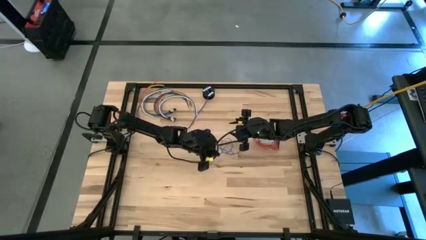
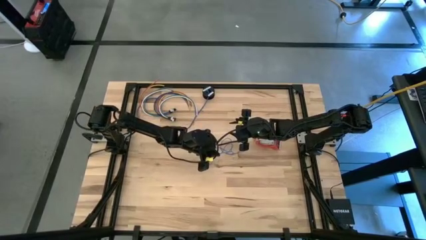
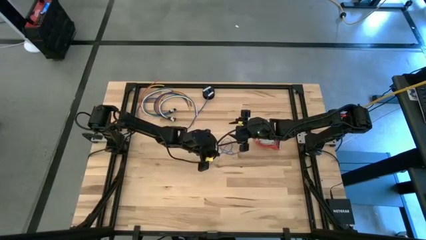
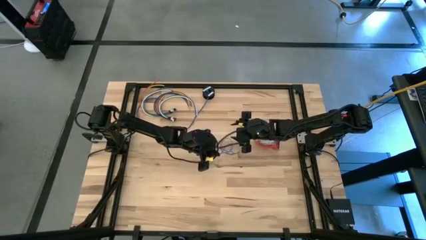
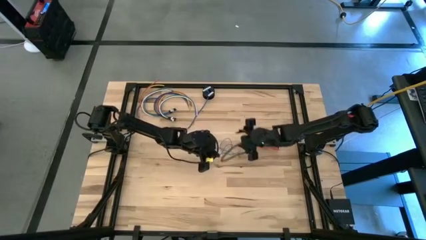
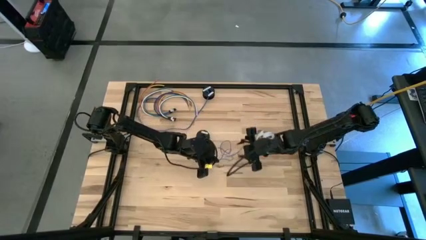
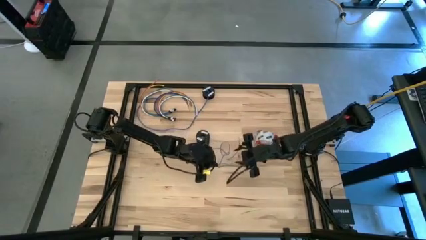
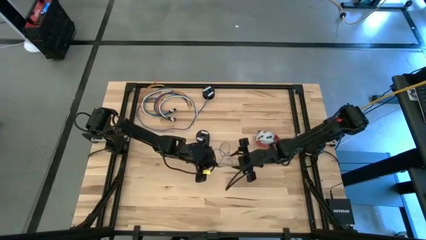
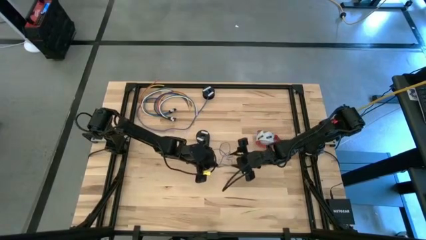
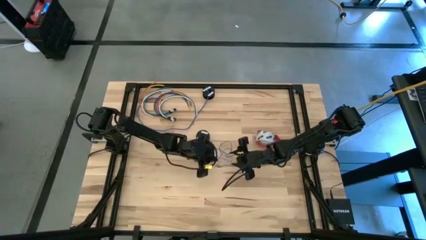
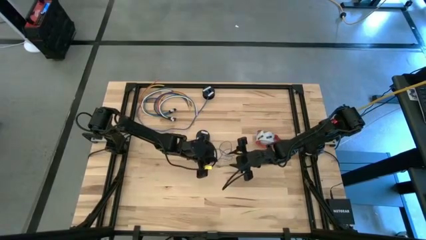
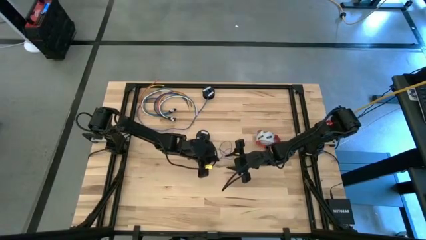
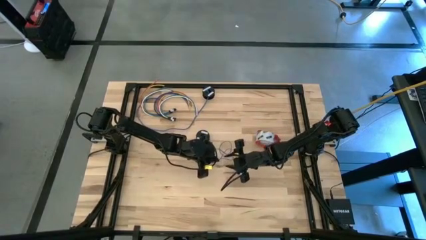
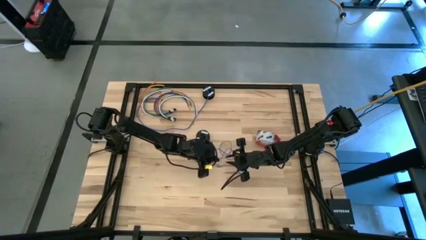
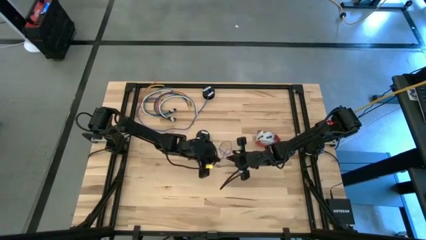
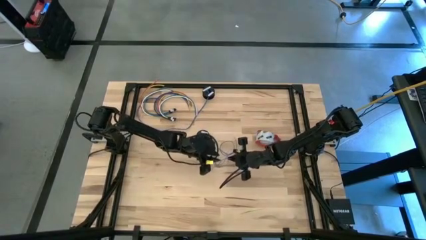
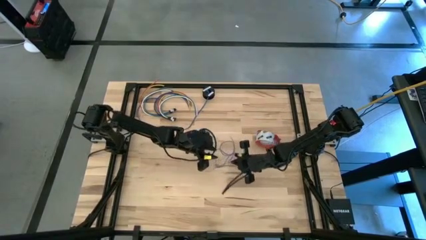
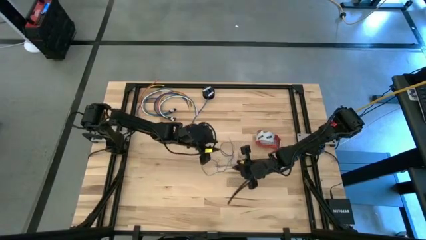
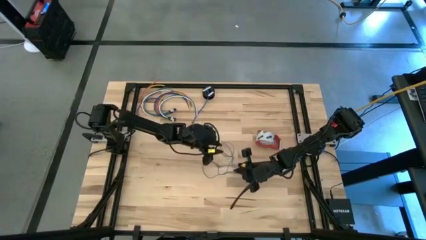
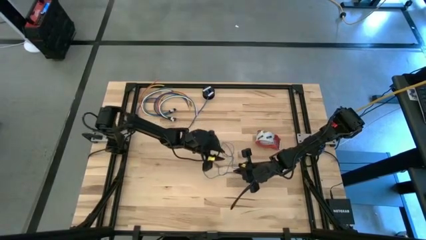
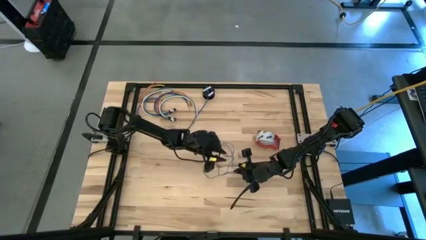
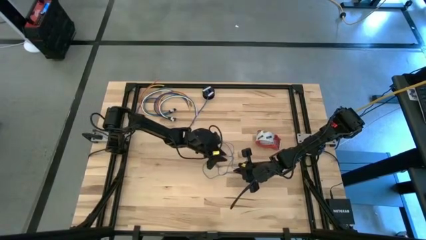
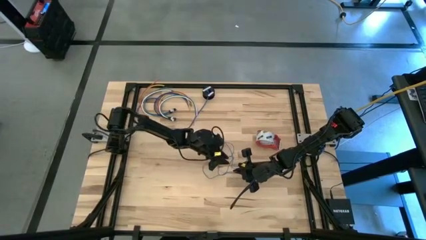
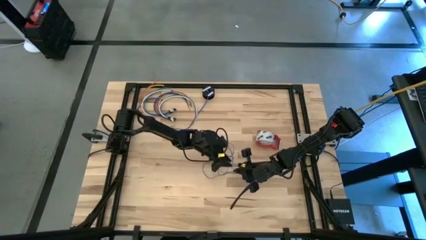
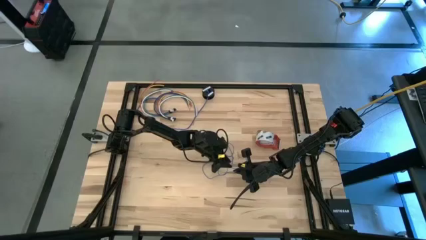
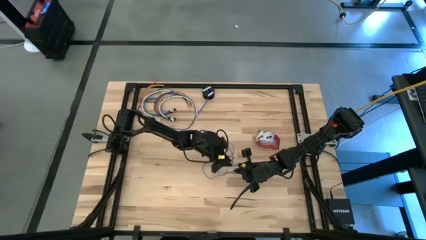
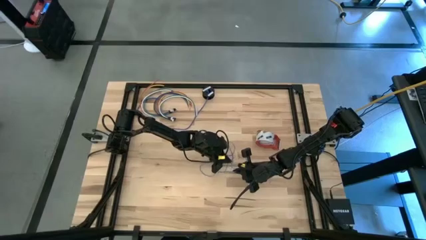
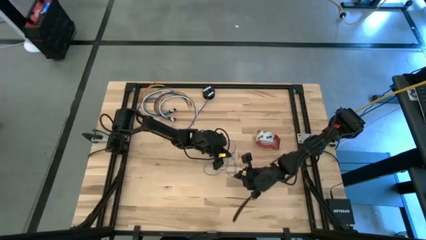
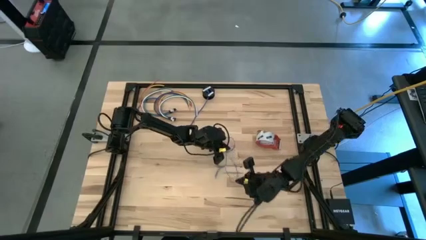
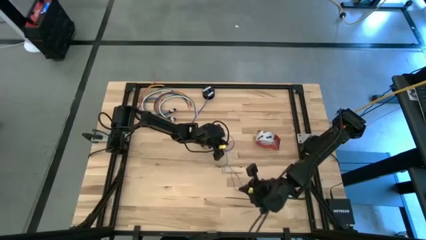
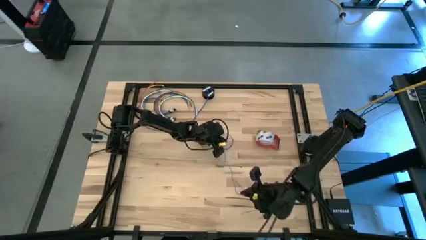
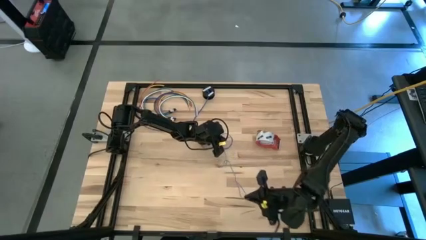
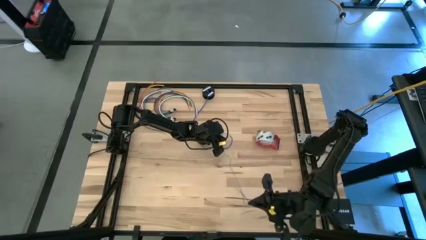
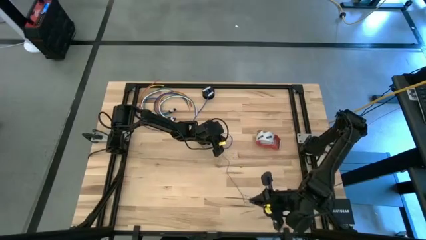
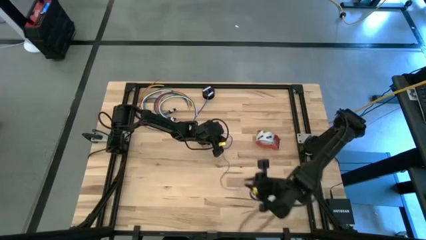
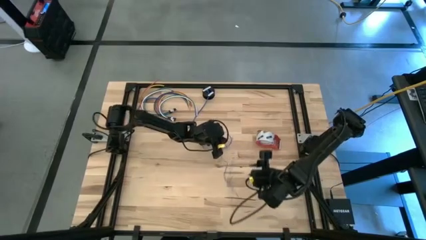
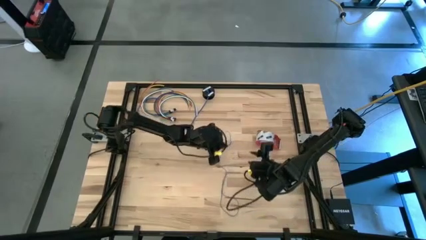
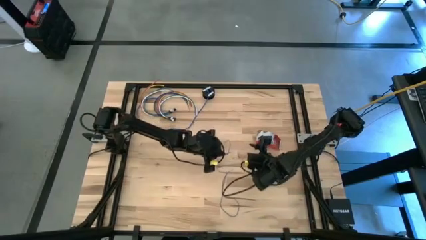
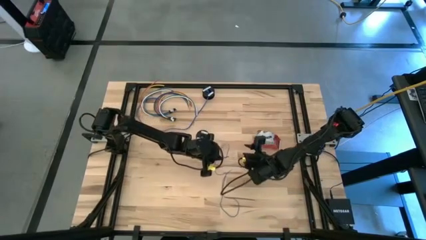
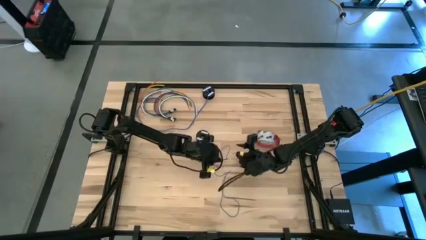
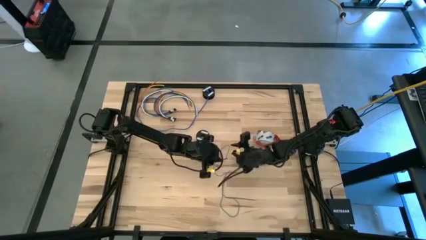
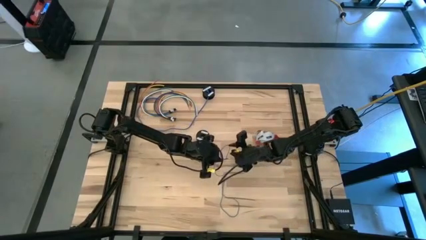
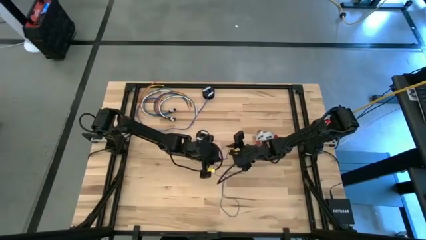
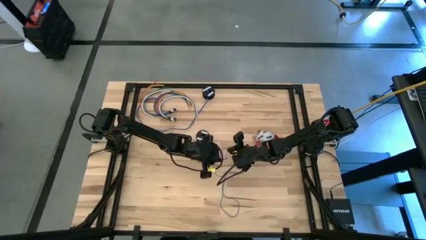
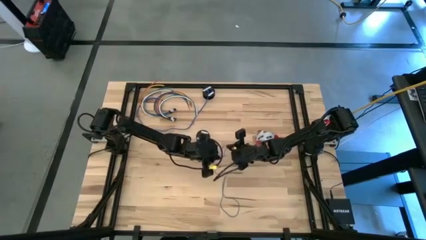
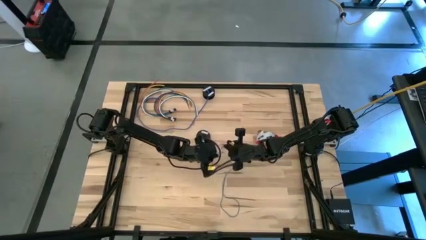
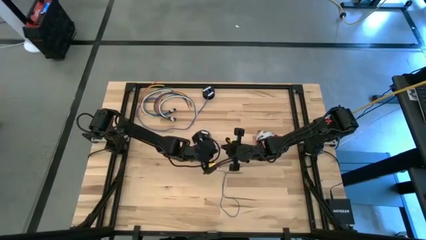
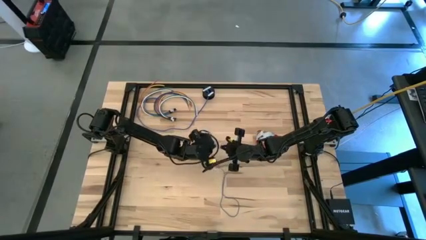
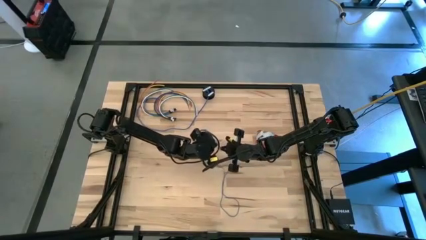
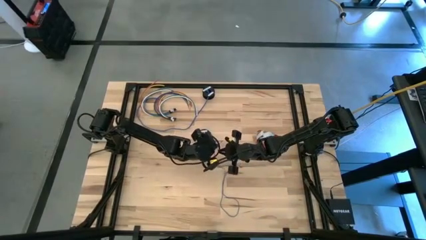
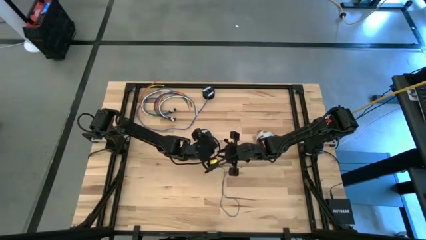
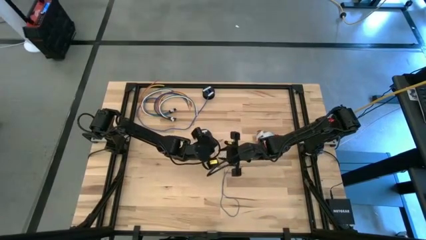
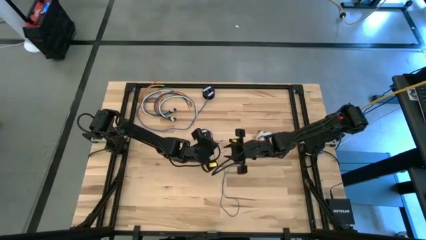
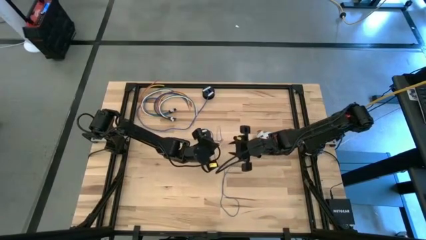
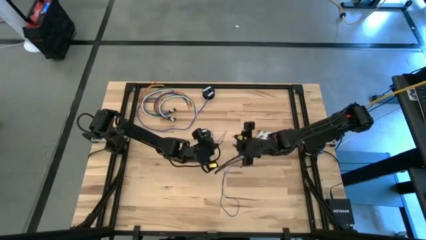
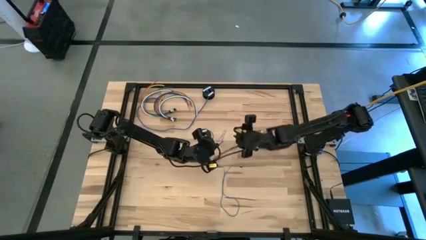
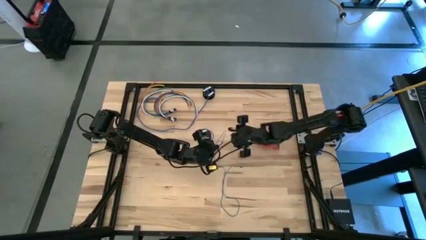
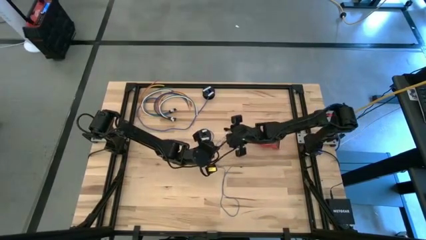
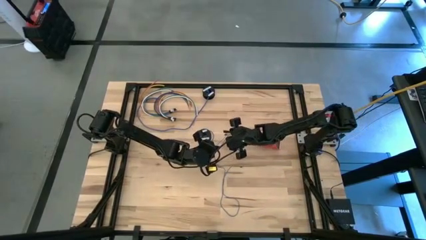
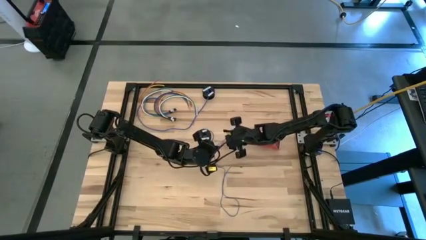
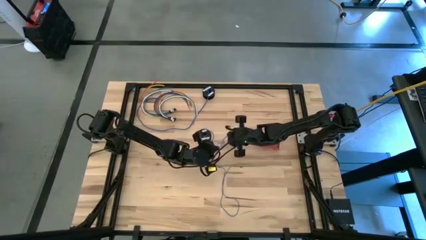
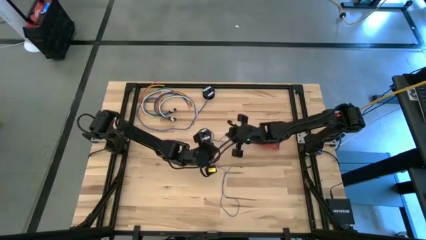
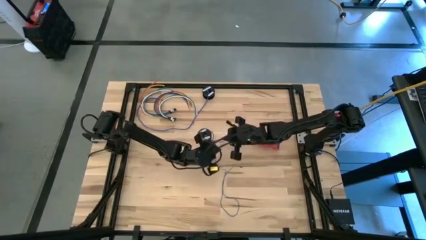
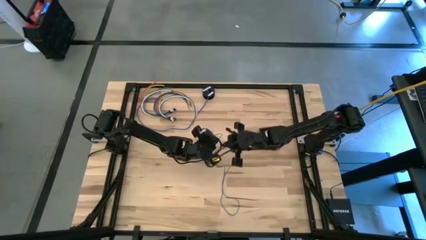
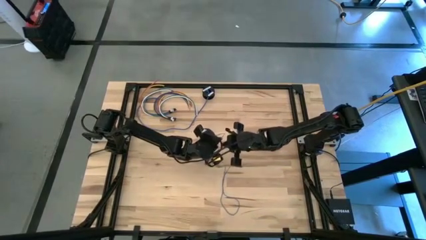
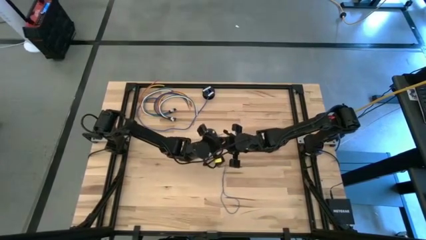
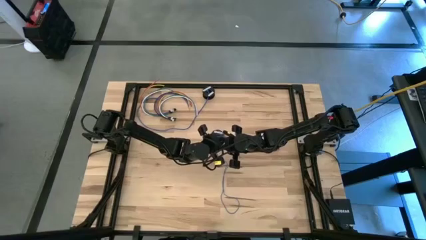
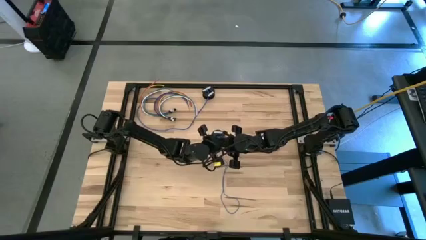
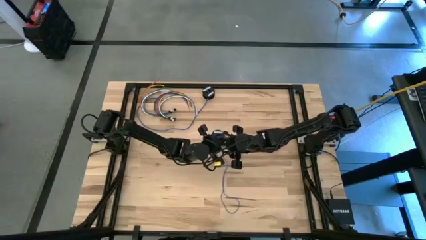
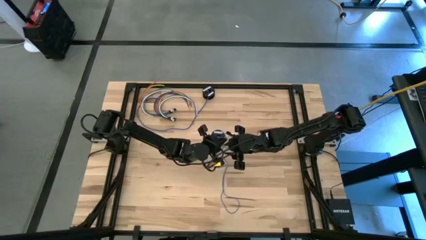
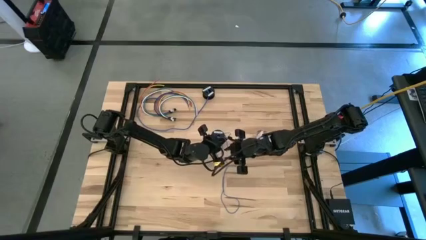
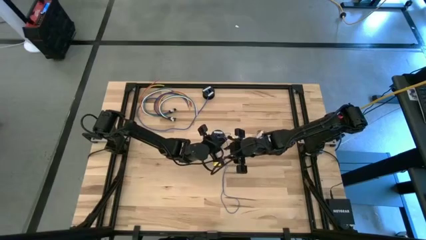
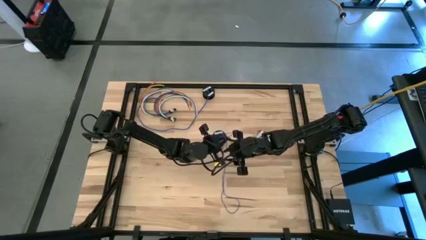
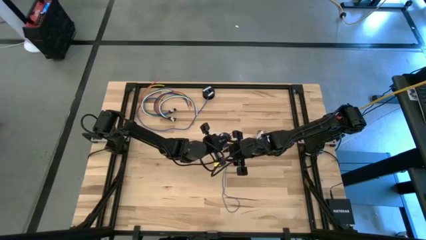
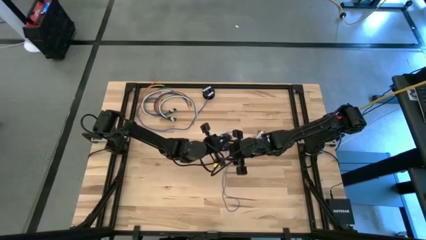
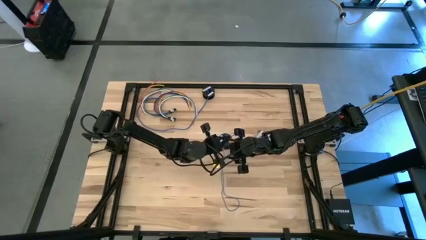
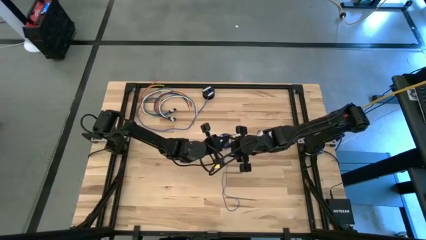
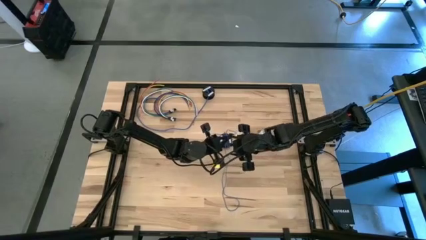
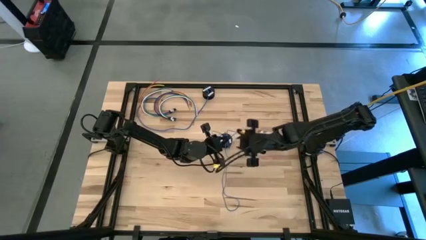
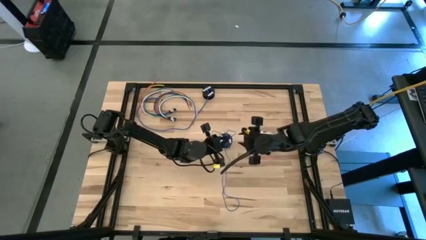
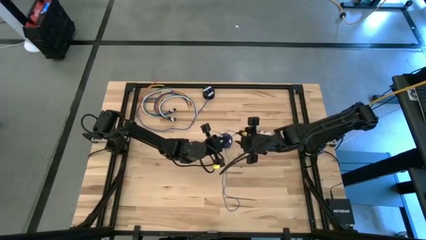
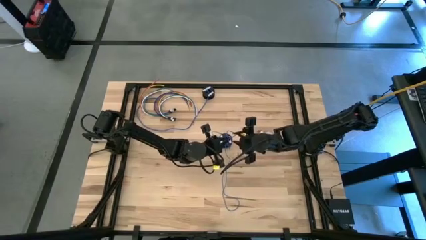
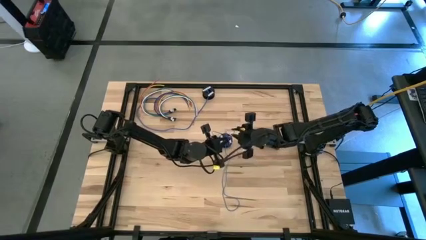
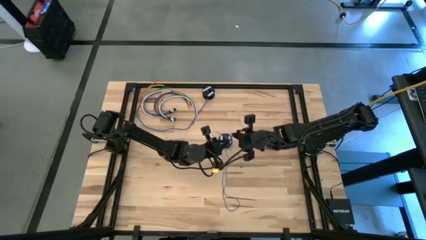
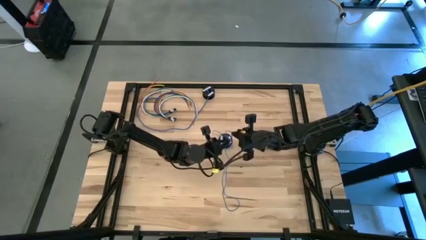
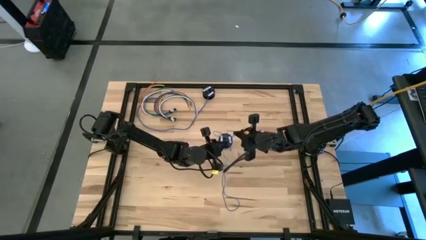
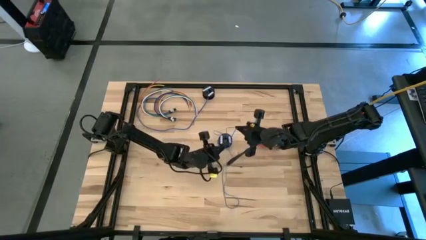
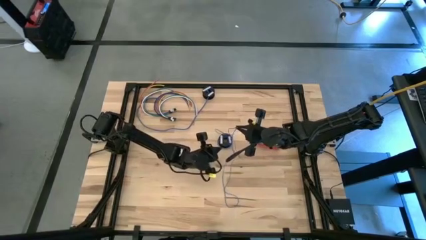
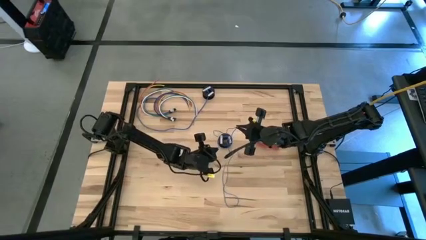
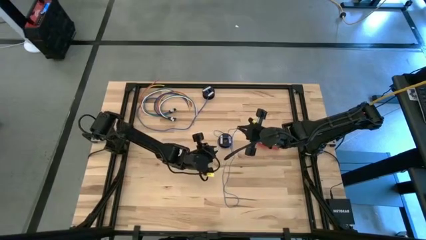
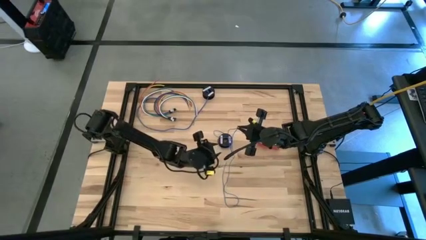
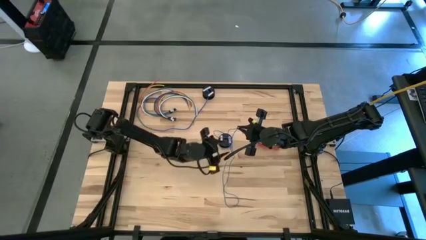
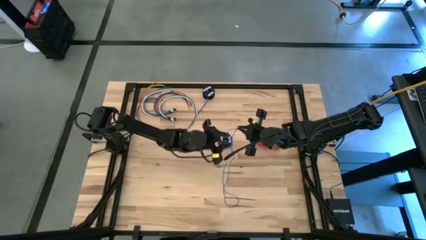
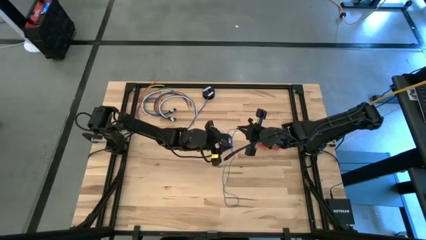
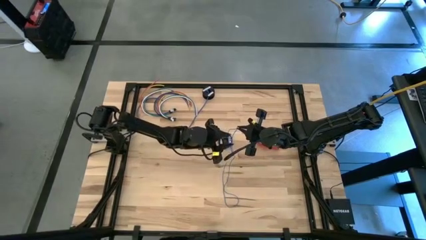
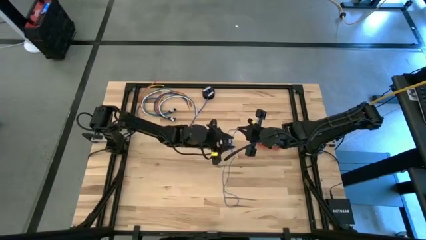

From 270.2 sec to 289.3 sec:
Task: Coil cords
Coil the blue wire onto the spool
